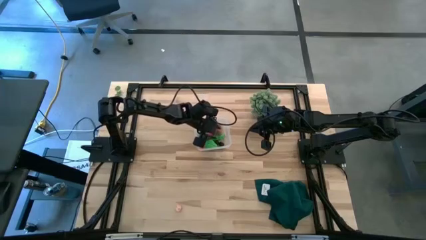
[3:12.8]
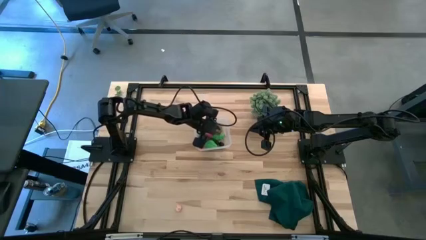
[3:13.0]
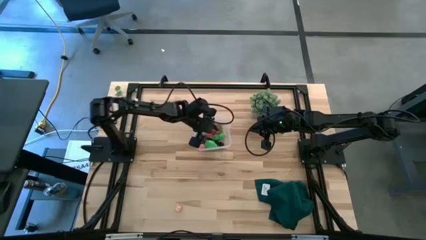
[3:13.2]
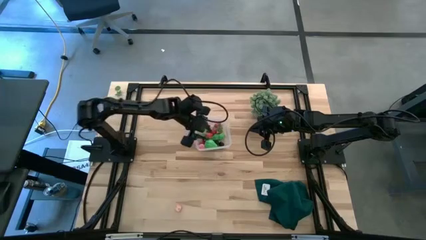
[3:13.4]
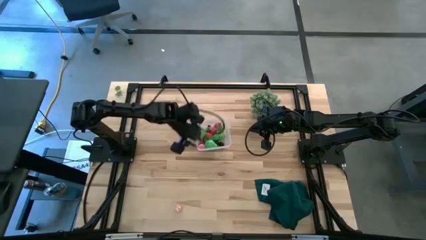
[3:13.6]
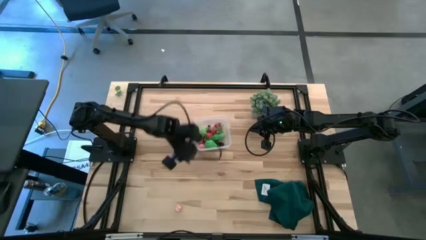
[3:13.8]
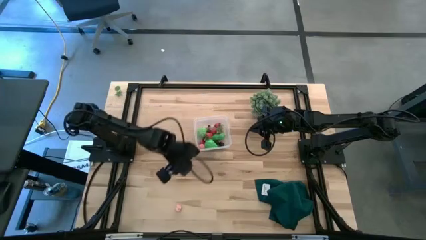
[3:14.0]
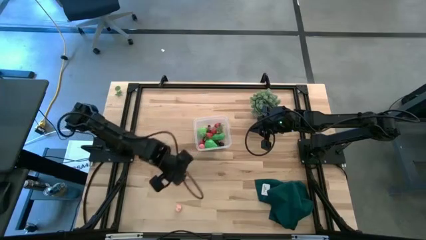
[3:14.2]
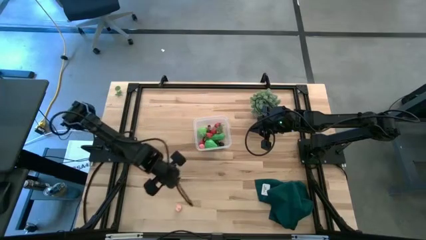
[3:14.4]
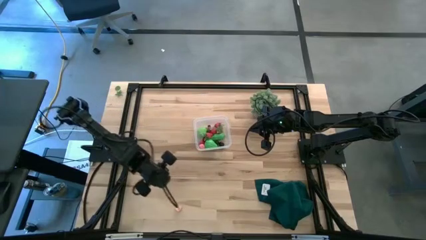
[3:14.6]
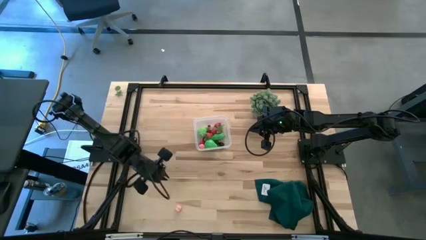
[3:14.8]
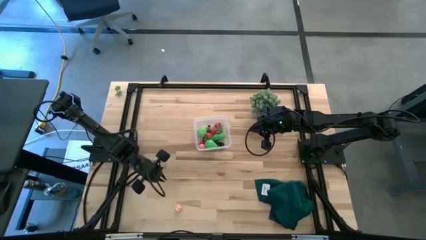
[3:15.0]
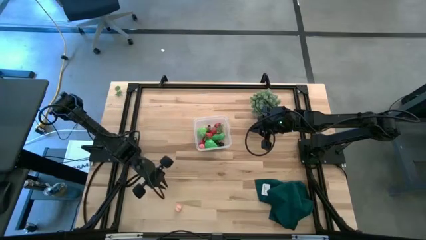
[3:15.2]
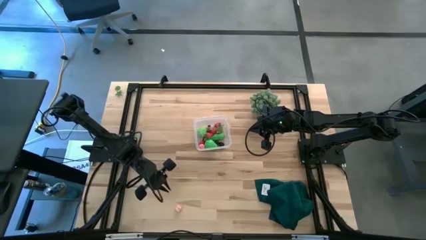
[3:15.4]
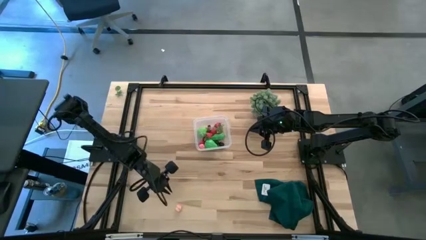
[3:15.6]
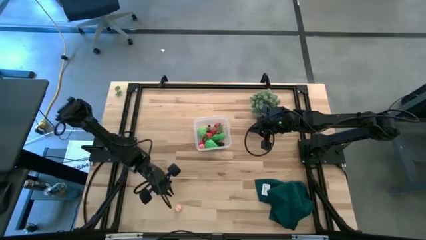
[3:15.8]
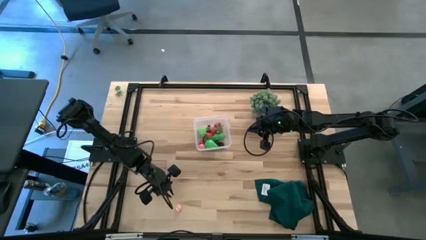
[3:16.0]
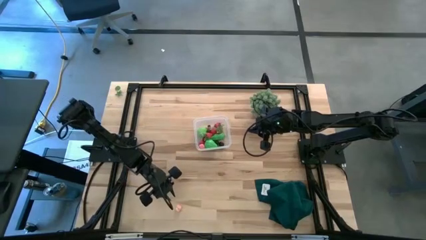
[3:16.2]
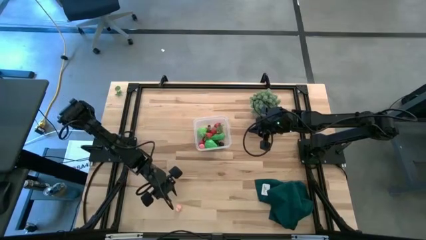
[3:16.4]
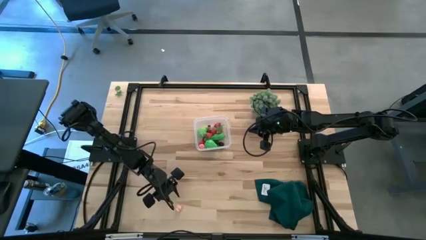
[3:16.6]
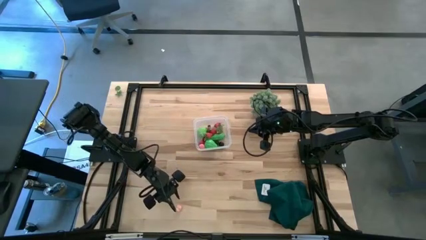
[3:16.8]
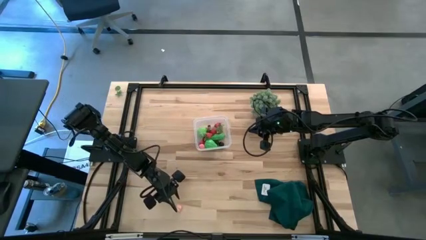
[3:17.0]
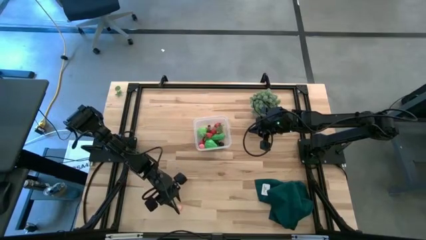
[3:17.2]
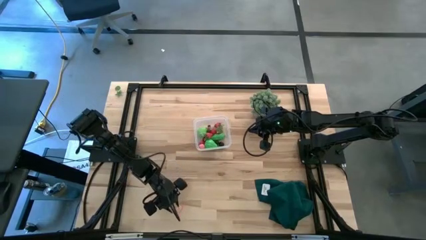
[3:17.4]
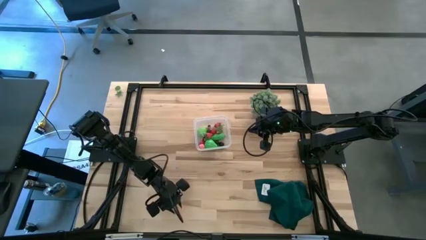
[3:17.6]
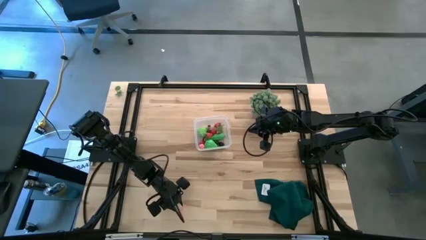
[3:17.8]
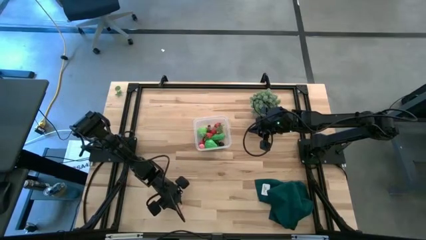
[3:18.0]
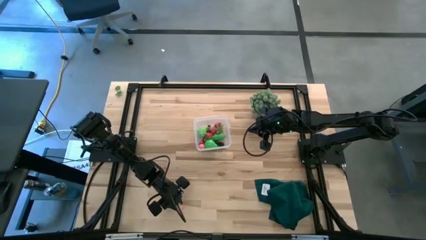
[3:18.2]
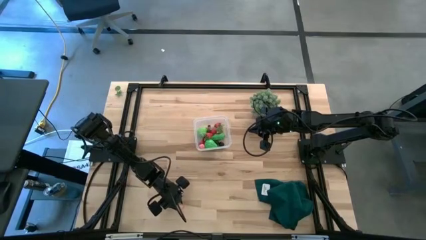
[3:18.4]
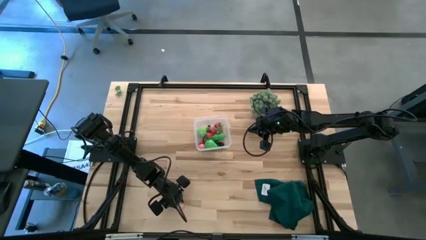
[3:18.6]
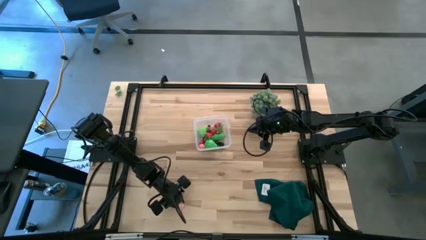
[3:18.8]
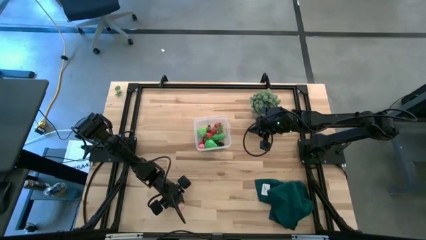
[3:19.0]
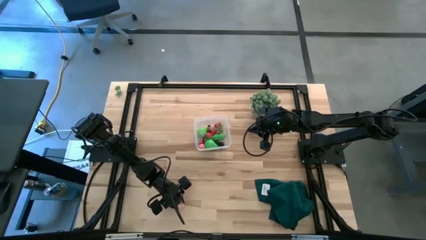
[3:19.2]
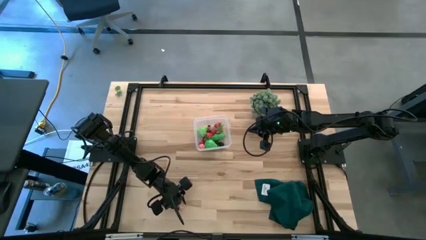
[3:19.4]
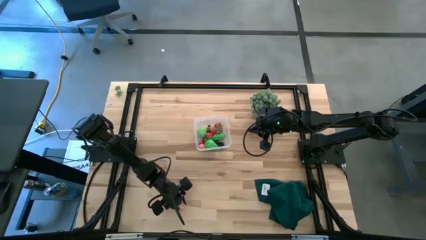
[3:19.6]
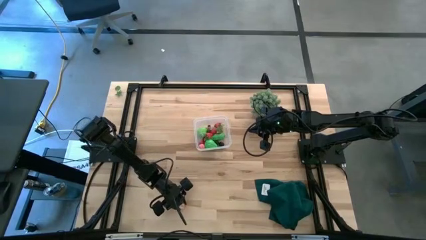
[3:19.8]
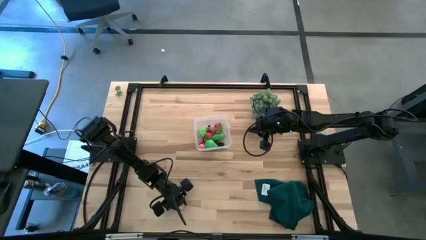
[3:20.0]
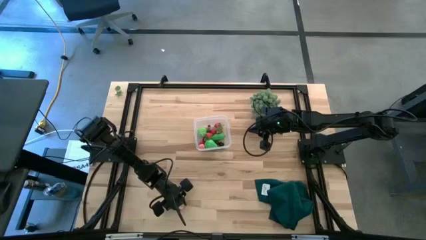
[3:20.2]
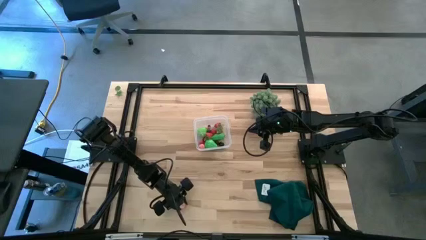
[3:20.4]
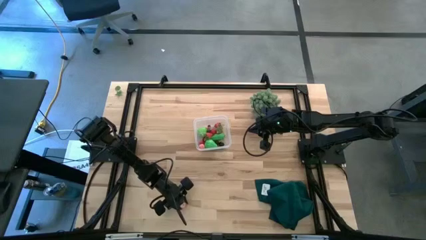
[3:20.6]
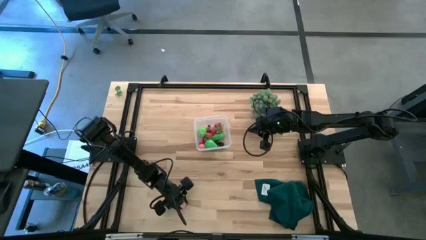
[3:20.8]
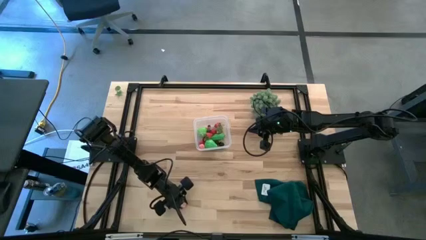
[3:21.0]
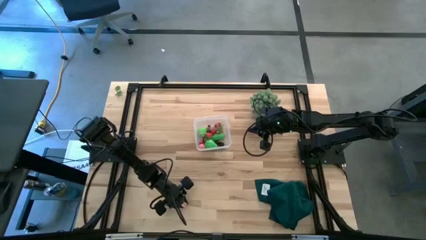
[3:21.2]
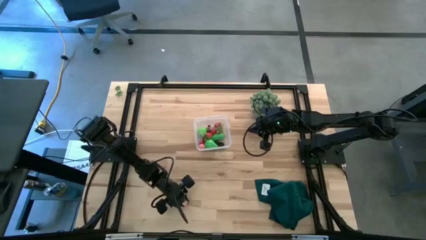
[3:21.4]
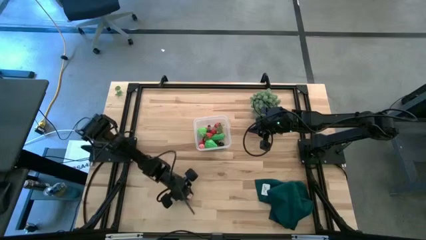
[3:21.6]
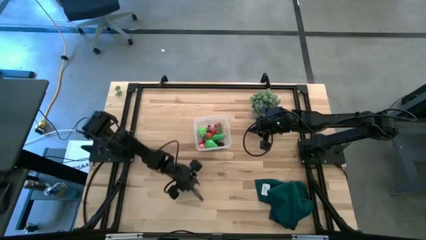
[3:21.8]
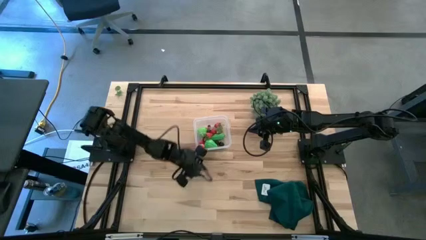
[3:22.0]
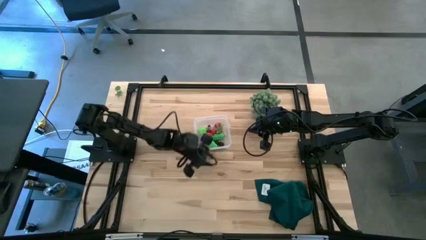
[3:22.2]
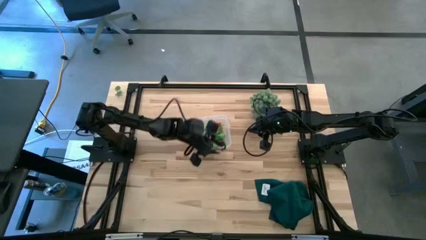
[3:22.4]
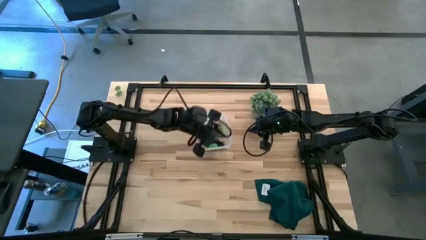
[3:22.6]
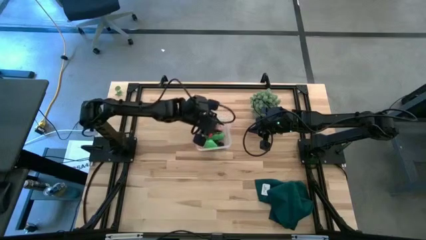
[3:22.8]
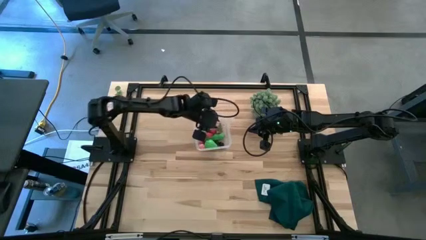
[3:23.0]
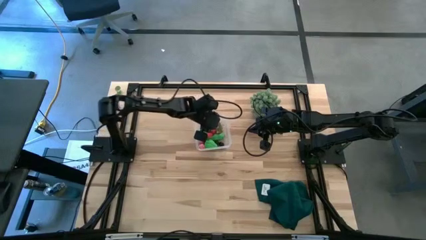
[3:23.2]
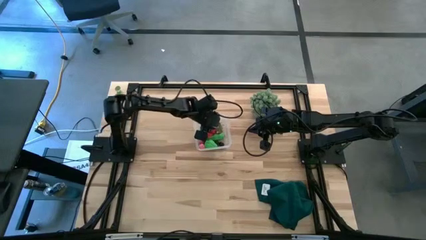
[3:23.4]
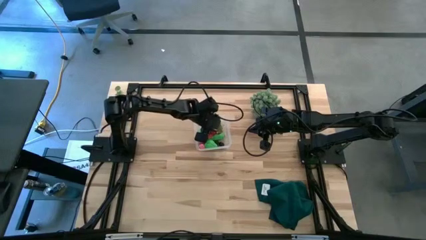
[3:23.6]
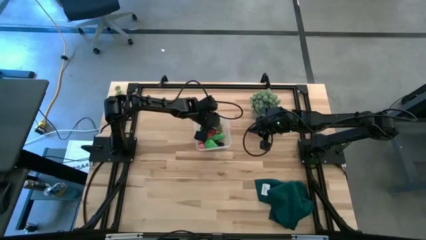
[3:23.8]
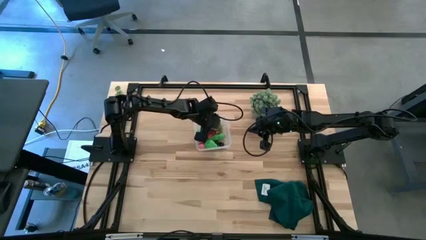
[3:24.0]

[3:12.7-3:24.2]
Task: Pick and placing Produce into tupperware
Put the pink peach into the transparent bin

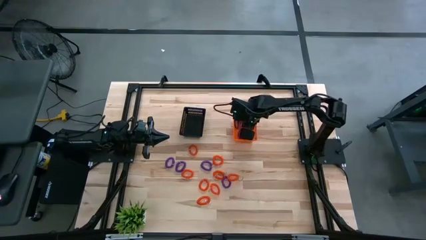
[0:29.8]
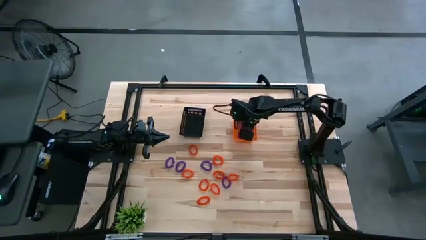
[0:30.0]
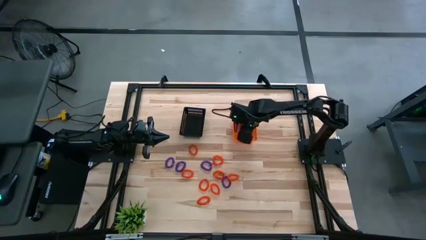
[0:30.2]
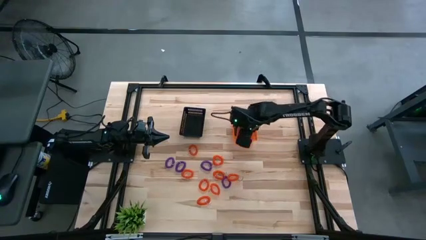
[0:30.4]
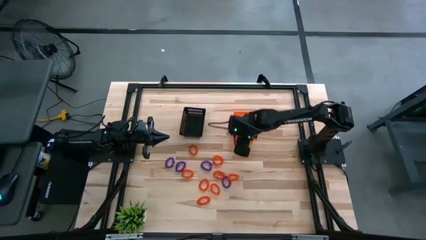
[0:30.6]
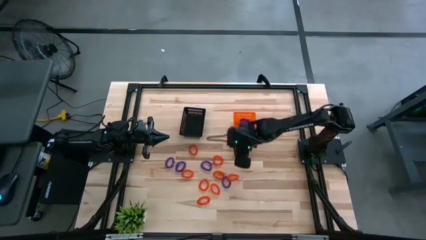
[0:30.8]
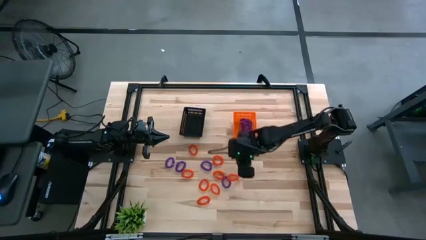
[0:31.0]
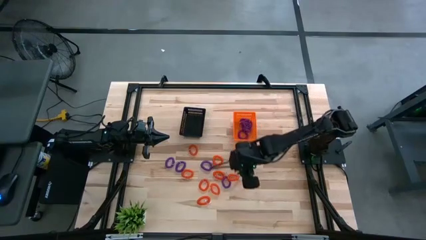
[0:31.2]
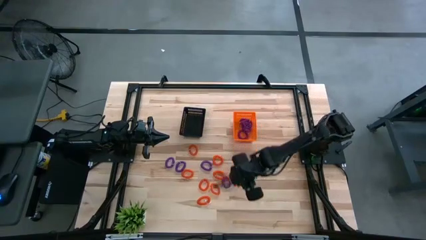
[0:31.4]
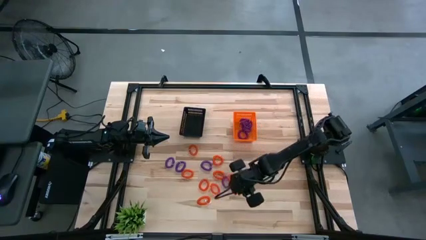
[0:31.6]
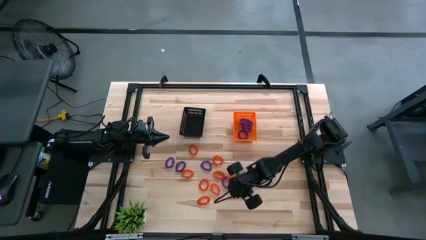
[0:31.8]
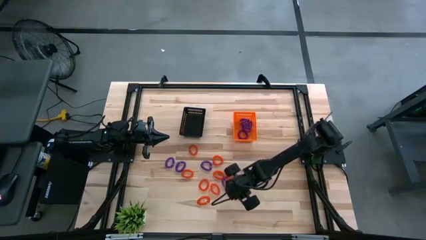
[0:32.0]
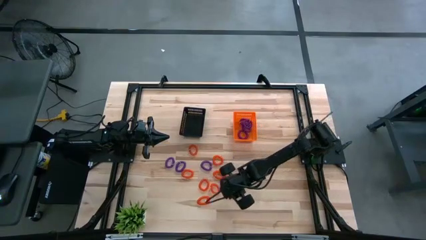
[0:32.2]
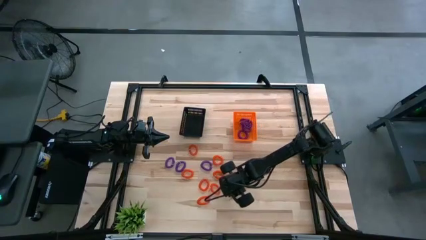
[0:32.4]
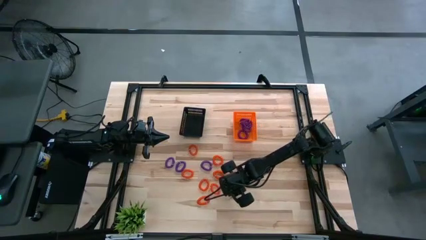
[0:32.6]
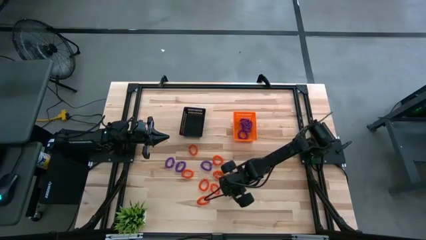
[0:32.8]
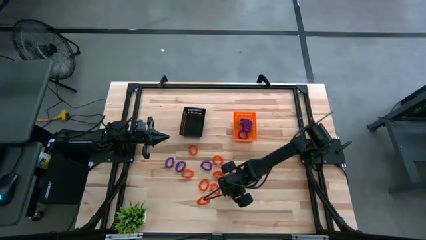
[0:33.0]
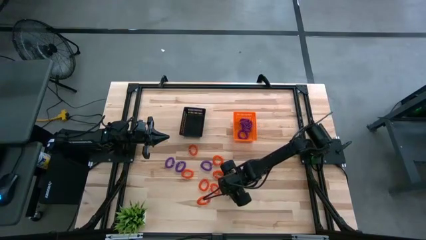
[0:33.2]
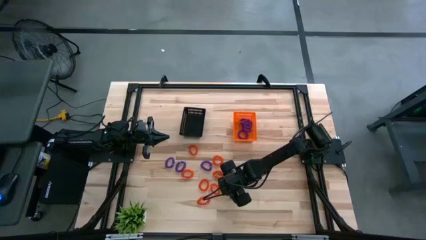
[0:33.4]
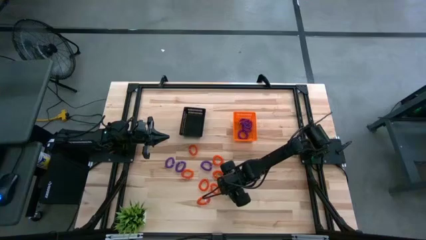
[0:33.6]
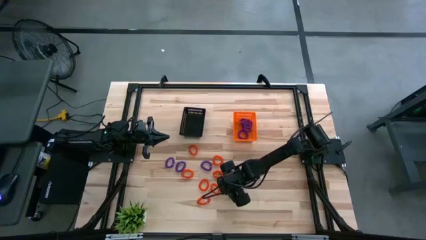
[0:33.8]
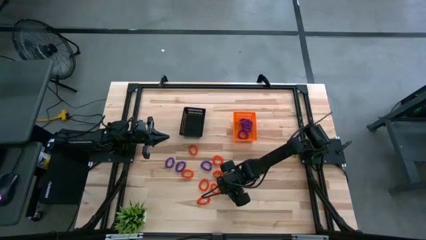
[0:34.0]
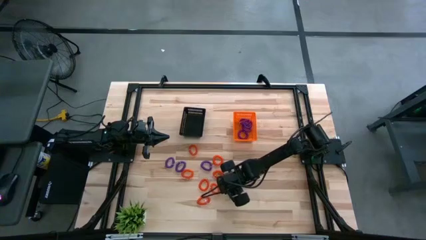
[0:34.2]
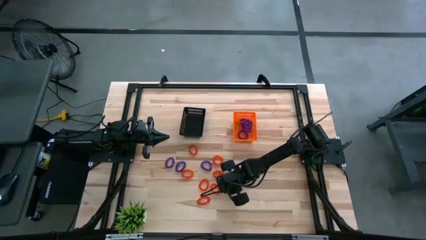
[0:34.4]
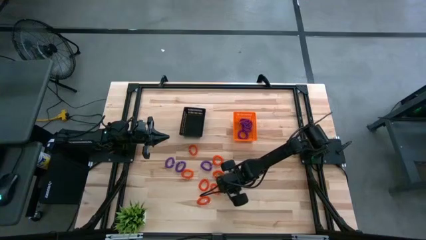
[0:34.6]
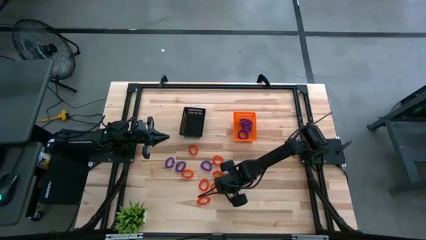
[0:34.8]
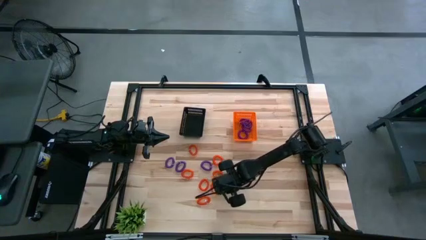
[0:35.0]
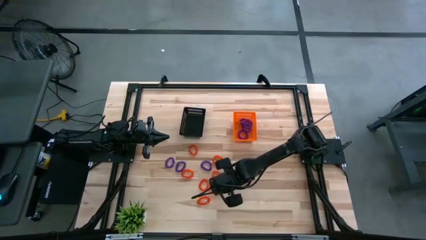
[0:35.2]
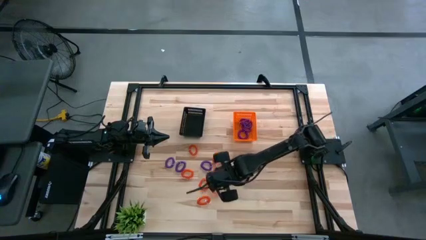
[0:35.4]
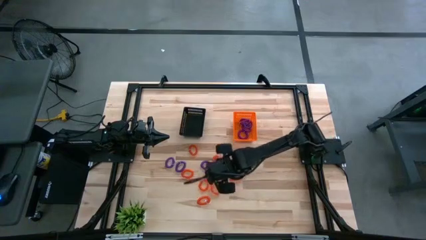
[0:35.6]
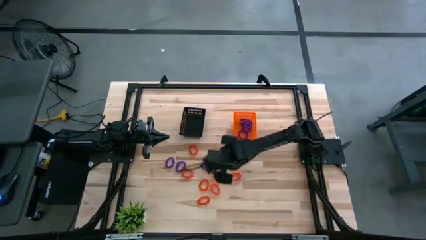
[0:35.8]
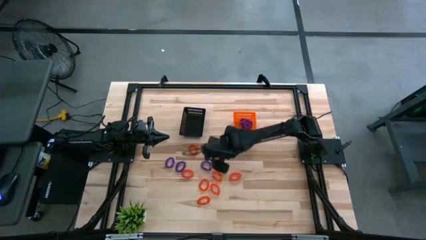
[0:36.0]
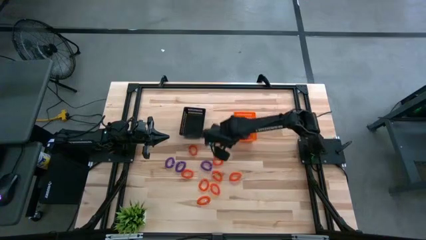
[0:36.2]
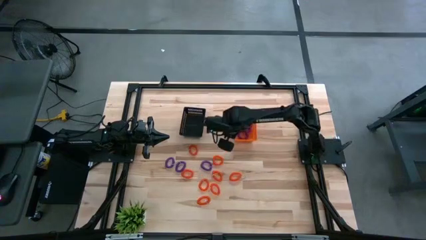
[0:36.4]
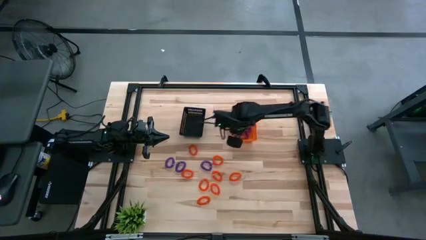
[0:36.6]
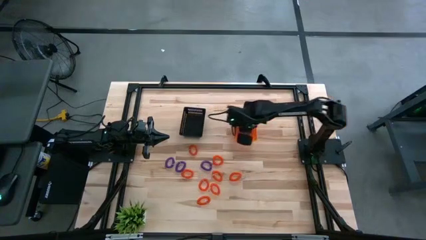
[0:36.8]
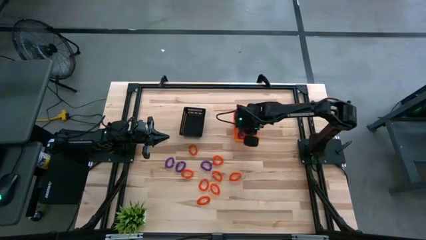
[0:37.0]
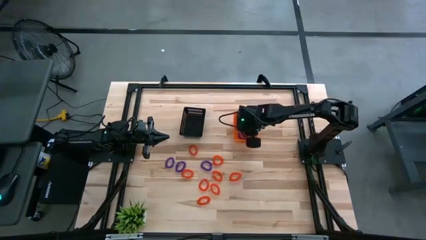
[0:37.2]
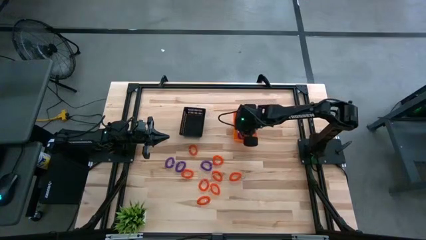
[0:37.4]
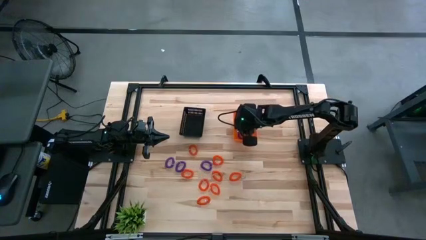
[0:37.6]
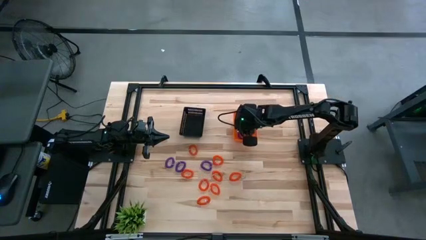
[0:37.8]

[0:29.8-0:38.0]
Task: Sort spring keychains into baskets
Put the violet spring keychain into the orange basket
